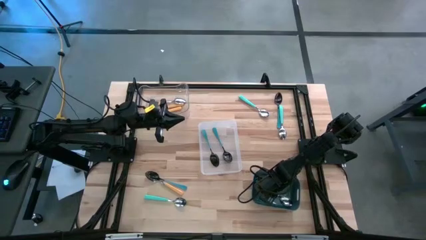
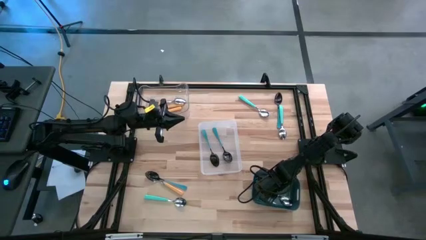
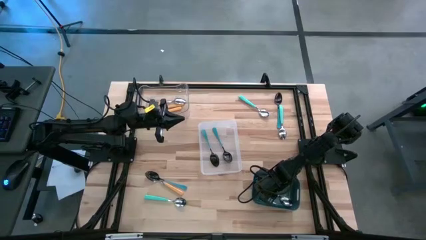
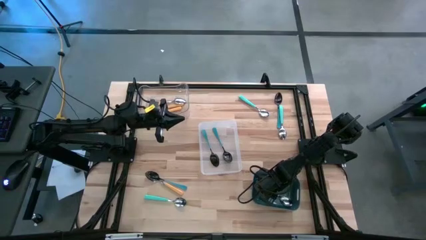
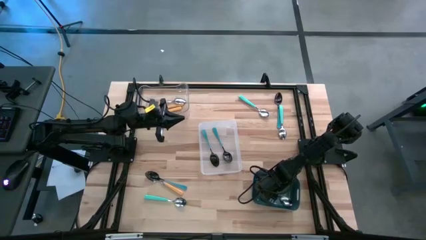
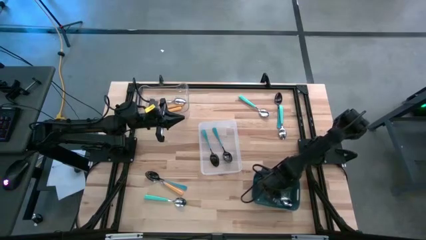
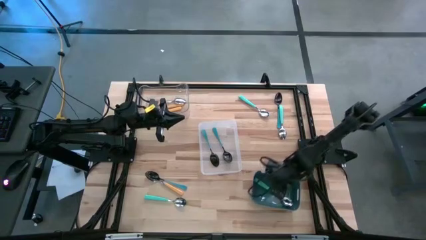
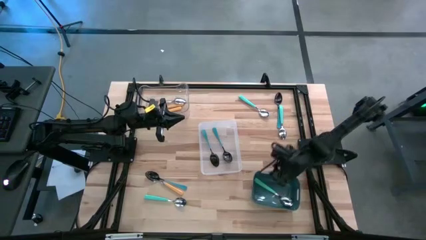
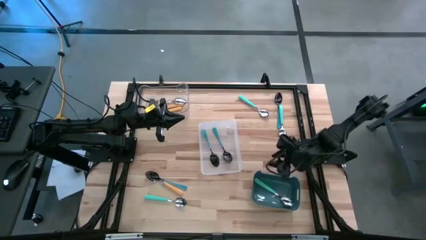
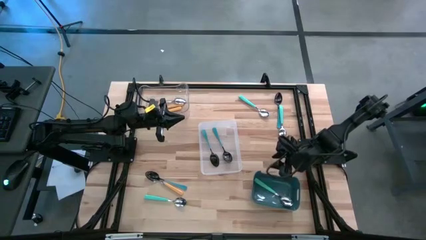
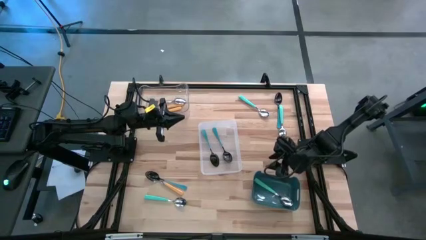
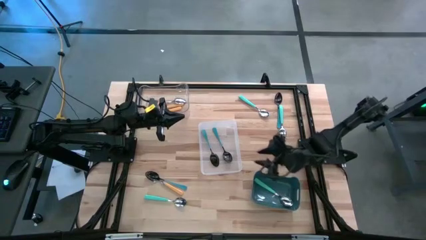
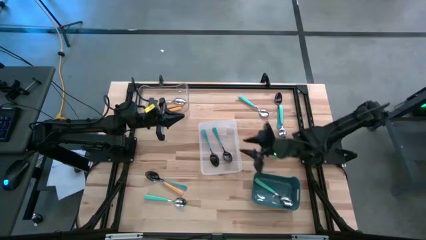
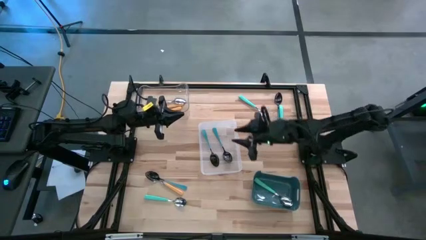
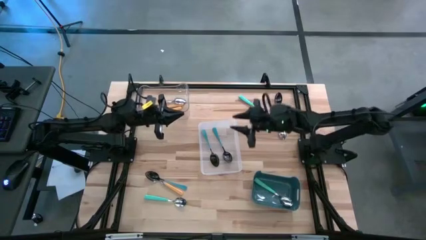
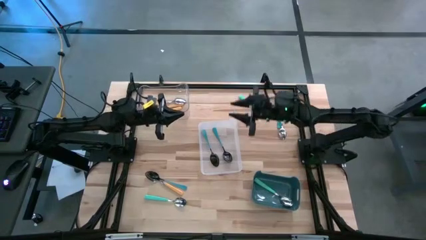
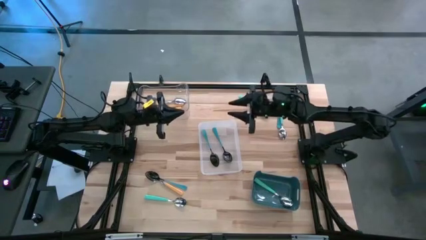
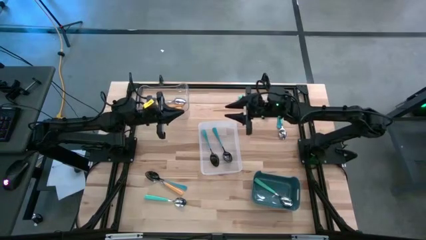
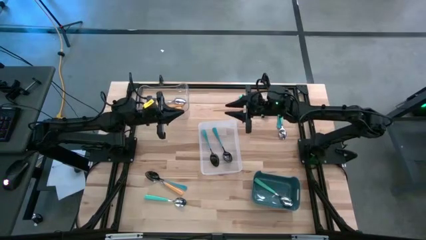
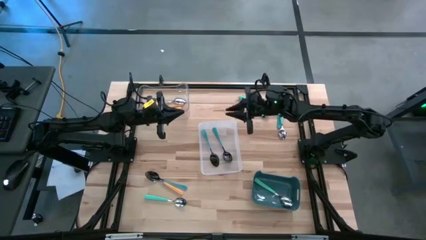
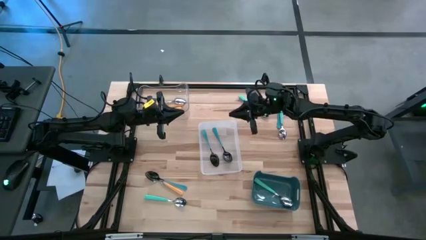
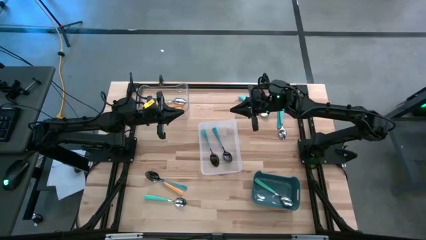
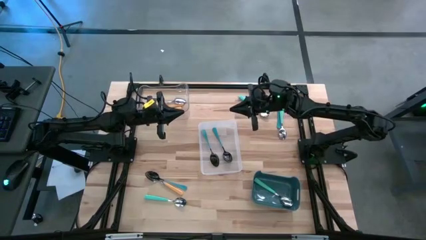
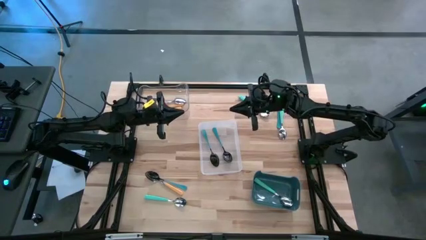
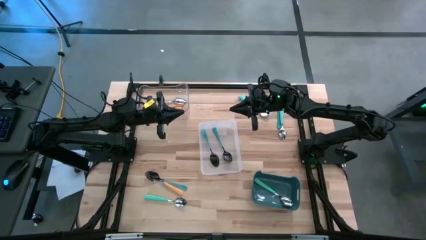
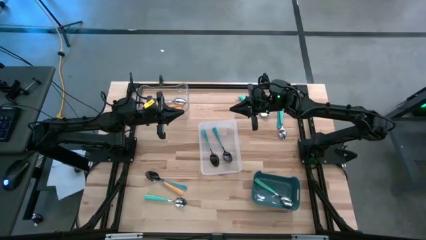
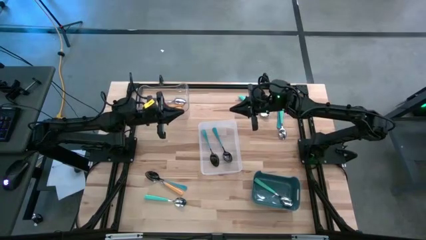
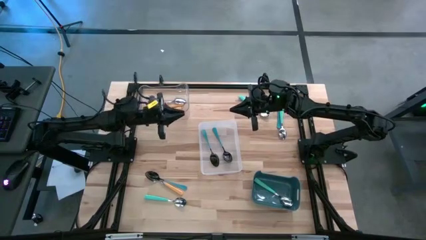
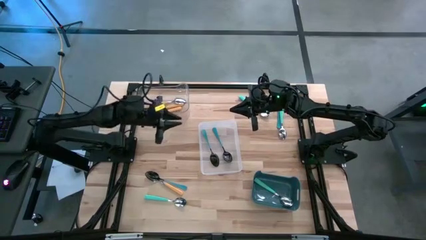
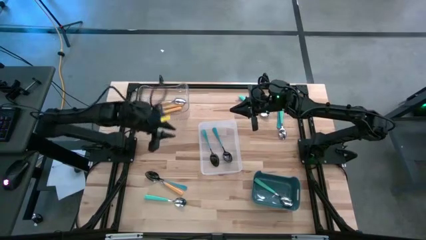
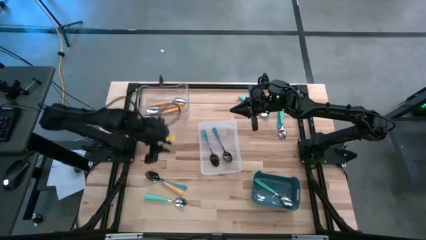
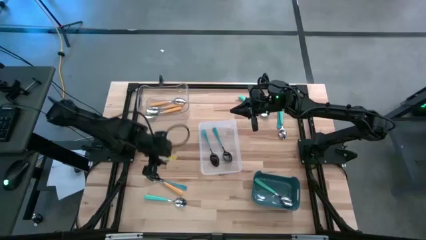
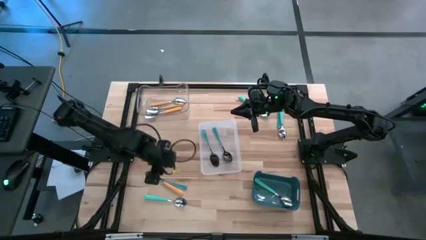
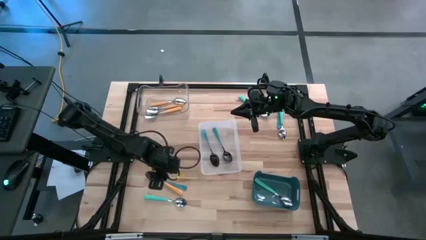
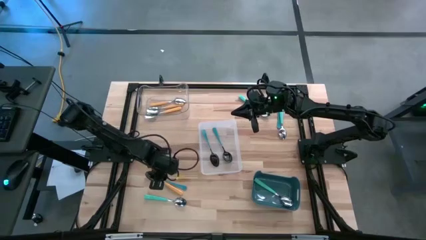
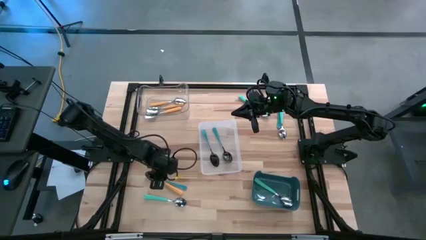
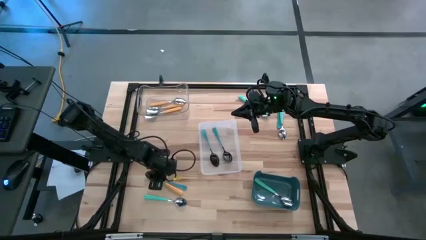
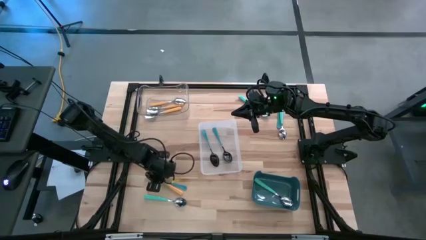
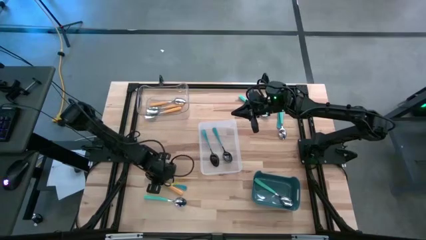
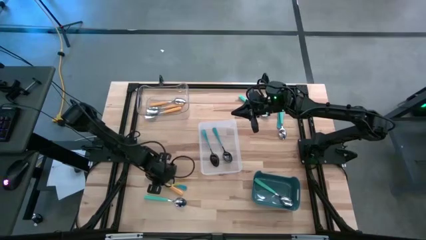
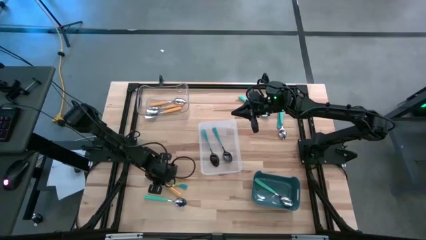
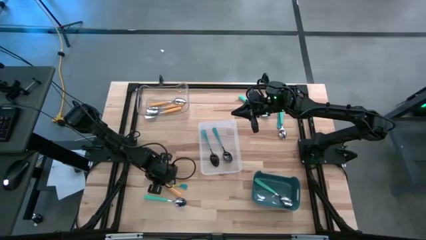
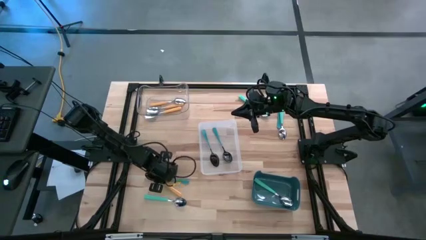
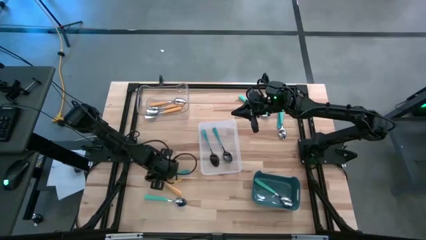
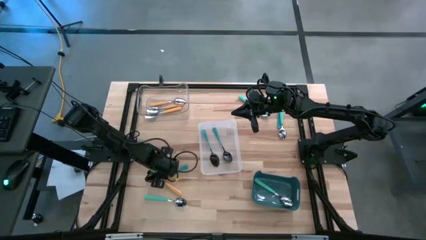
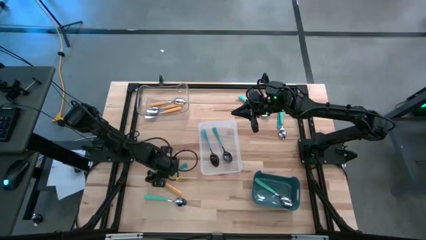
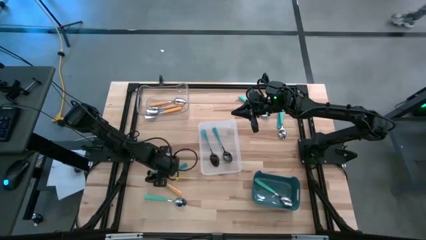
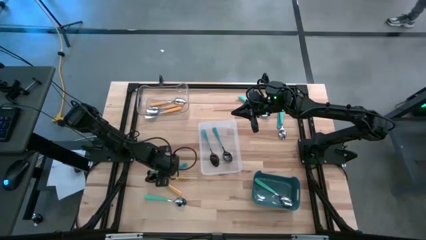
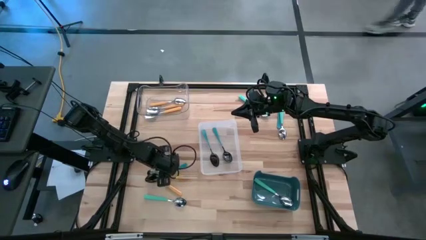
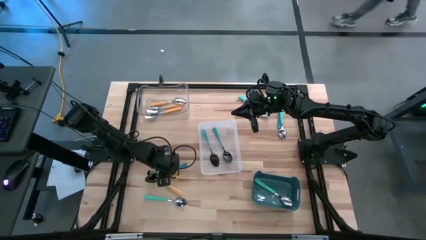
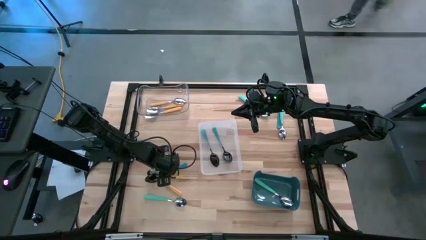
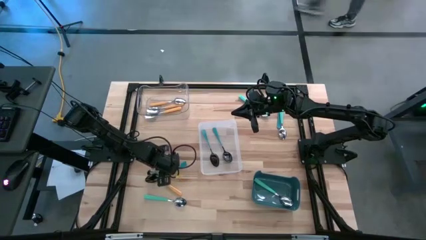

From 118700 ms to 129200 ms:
Task: Sort silverware by color (type)
Put the blue spoon into the white transparent bin
